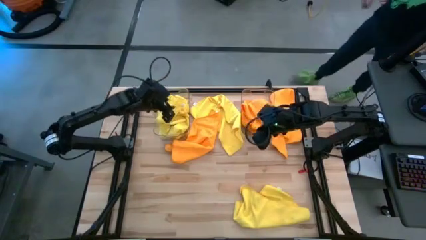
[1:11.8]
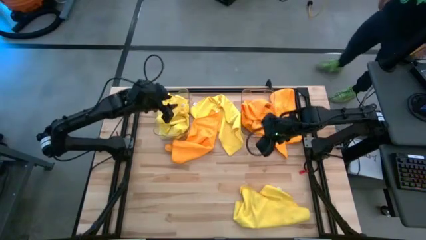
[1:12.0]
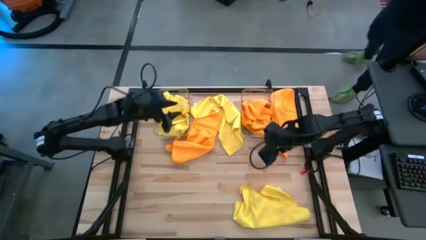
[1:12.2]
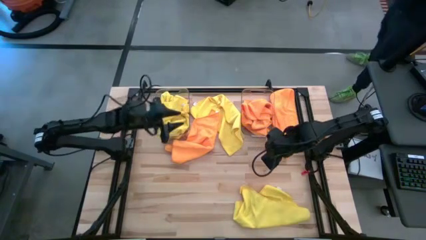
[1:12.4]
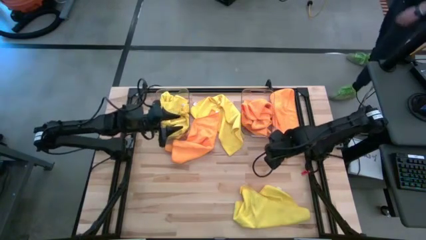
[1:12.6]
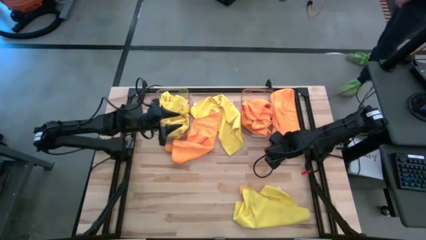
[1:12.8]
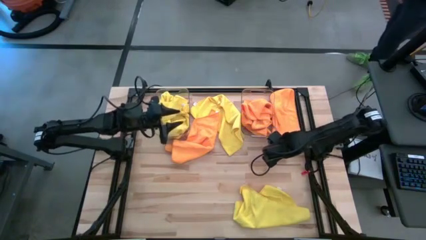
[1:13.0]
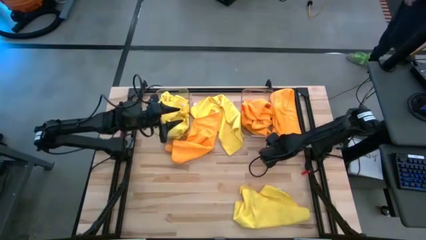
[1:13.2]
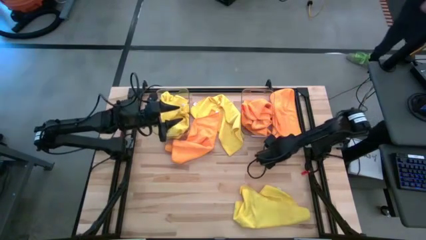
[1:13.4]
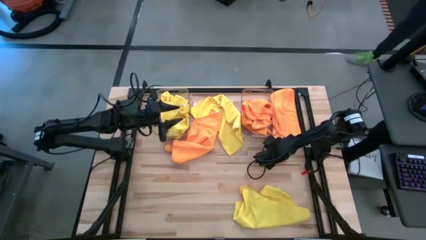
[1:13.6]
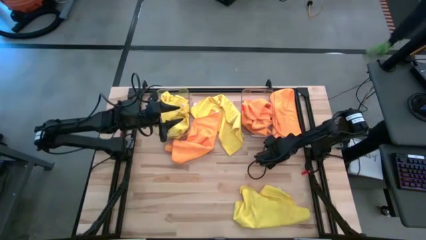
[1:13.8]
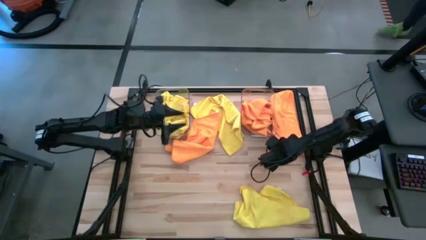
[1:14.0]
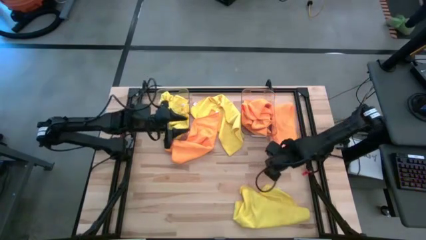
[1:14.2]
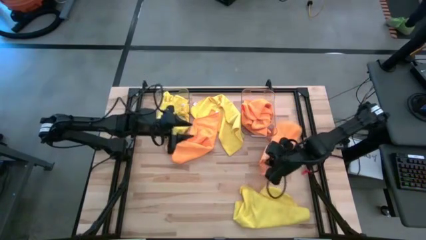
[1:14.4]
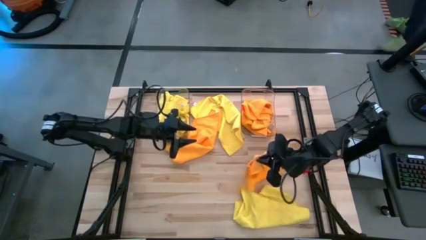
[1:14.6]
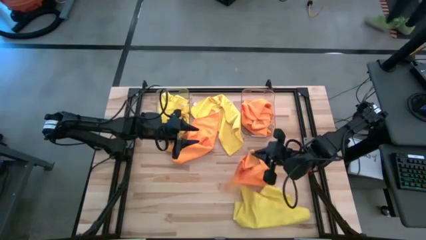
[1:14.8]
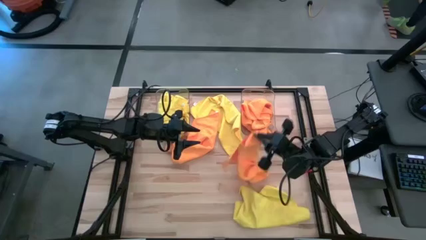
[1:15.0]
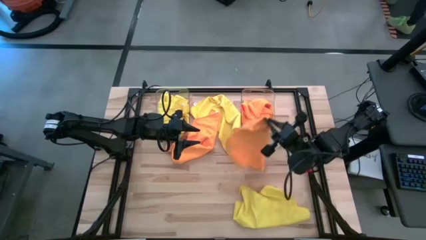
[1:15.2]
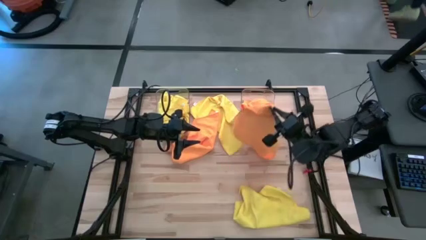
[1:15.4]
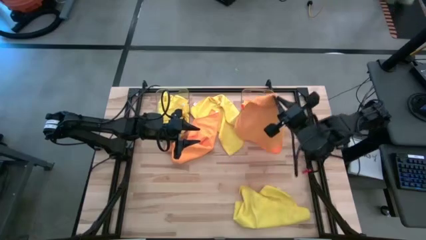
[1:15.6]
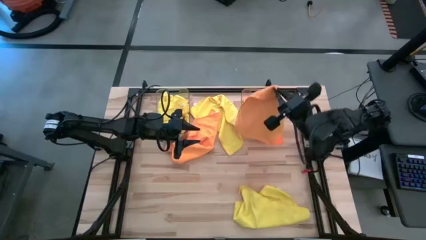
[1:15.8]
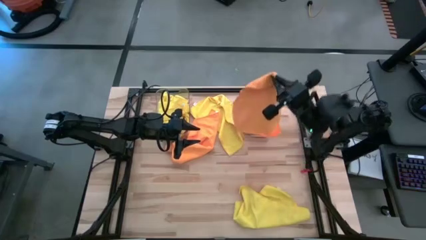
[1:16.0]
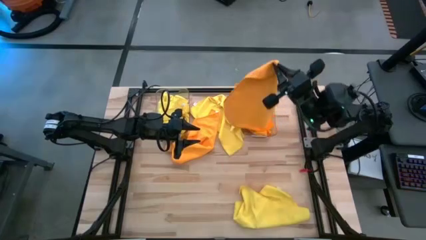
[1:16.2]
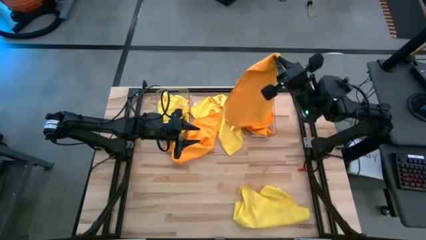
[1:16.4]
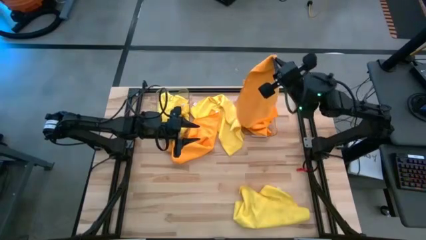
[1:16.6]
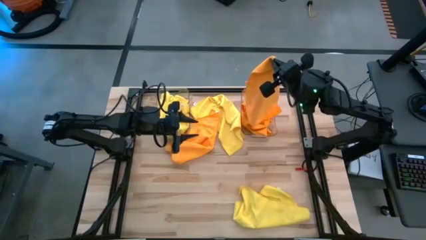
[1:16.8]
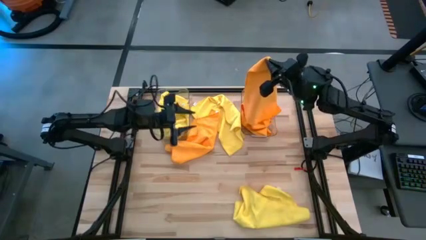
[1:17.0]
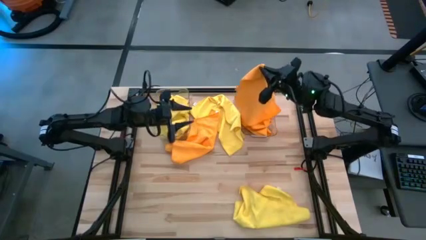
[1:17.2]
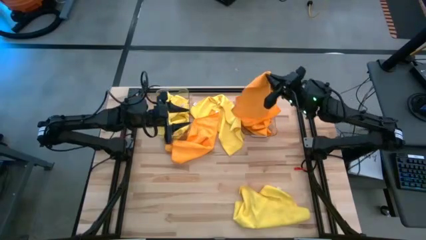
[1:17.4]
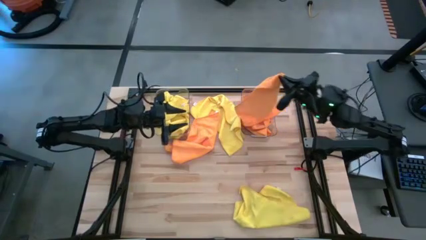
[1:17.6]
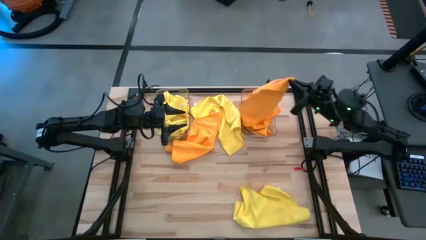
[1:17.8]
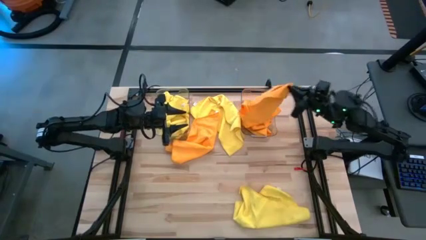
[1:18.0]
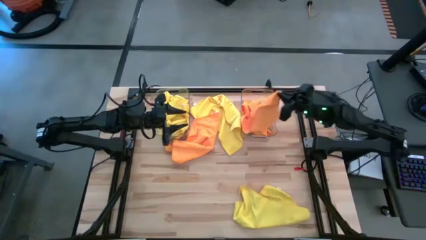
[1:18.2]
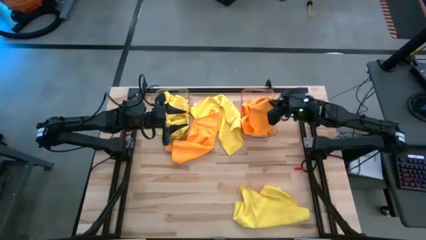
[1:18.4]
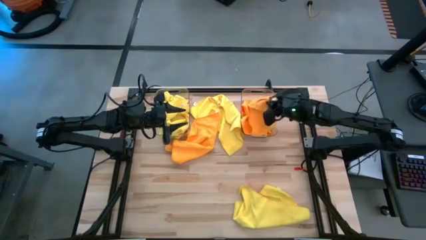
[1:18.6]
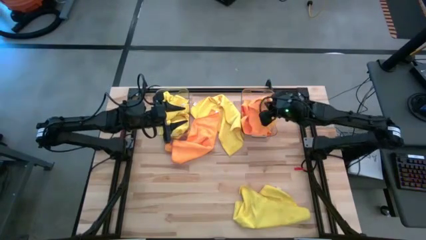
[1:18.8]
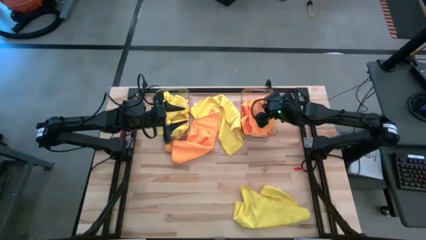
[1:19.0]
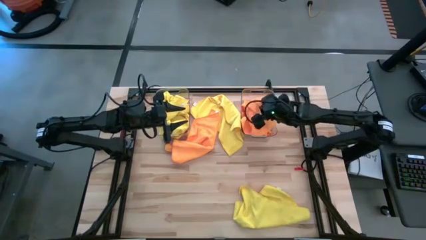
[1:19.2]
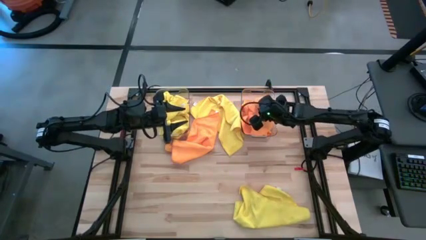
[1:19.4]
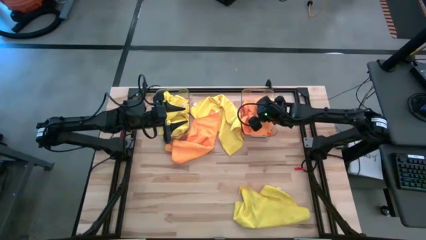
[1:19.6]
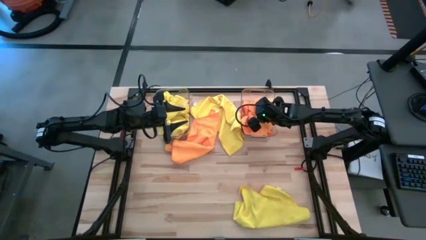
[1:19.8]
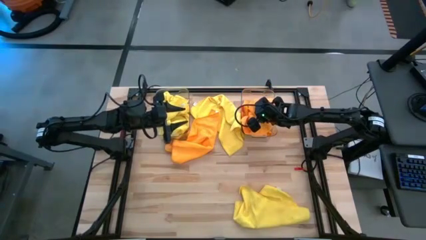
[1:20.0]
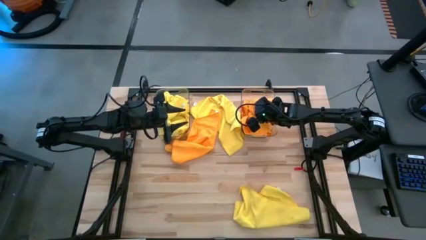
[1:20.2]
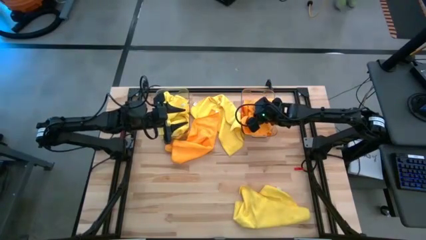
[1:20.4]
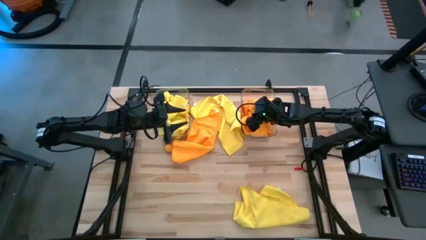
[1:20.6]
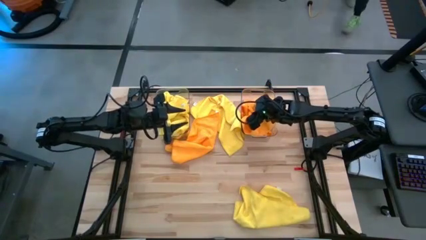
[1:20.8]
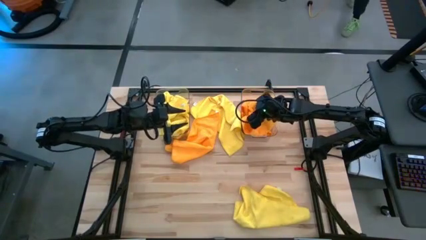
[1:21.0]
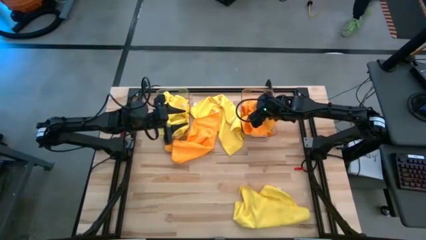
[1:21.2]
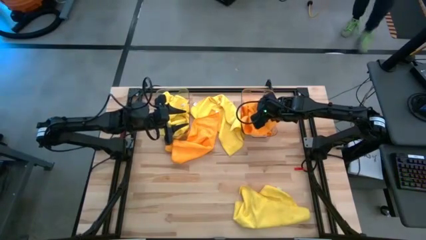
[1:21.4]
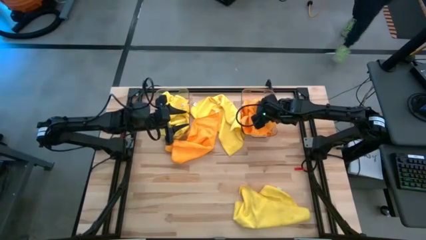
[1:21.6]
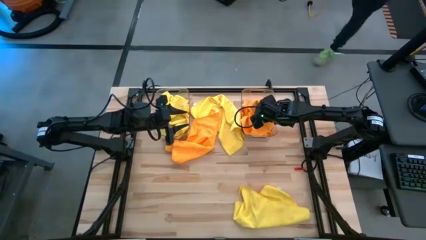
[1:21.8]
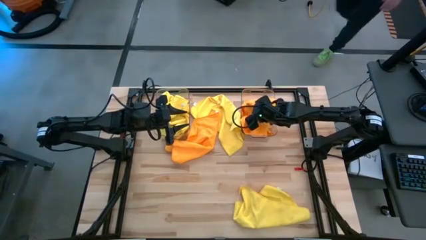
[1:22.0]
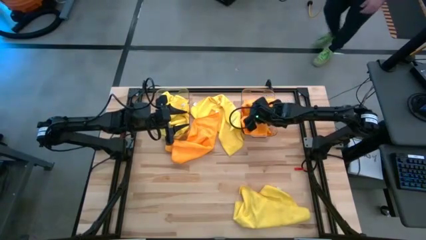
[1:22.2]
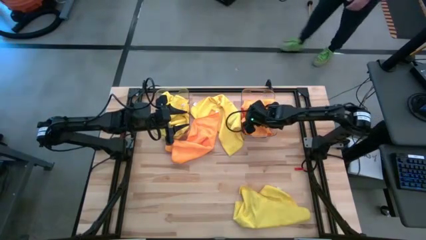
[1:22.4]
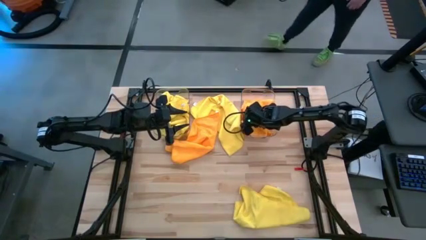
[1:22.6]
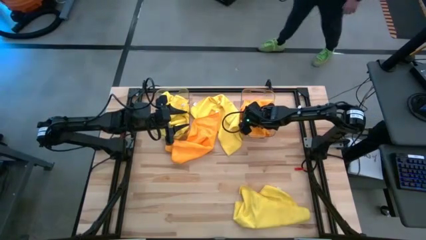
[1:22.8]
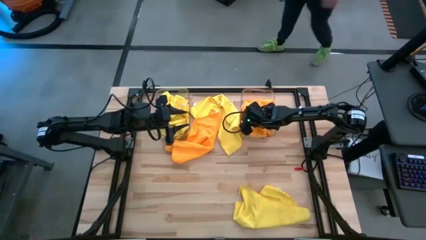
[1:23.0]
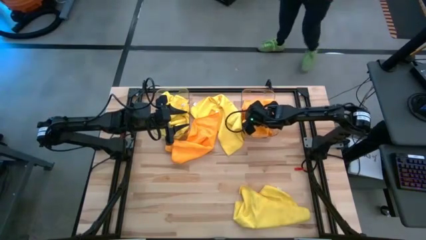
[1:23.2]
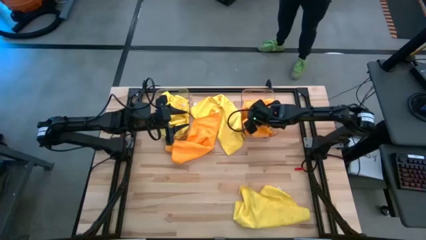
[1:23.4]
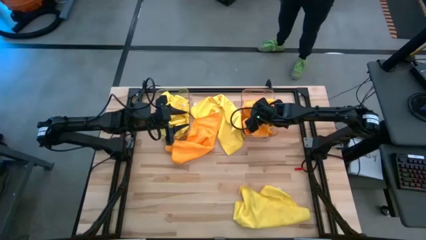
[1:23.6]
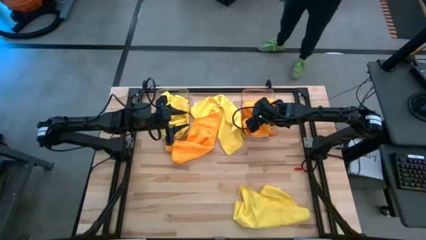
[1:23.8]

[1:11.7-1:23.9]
Task: Sort microfiber towel by color & place in baskets
Put the orange microfiber cloth into the right transparent bin

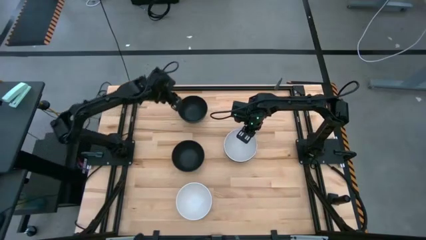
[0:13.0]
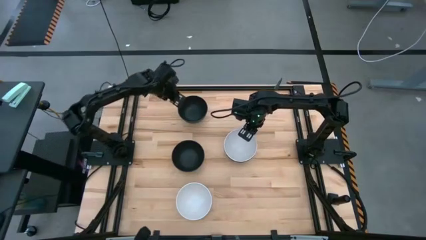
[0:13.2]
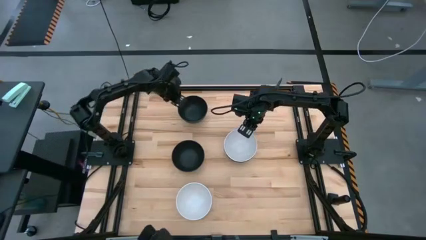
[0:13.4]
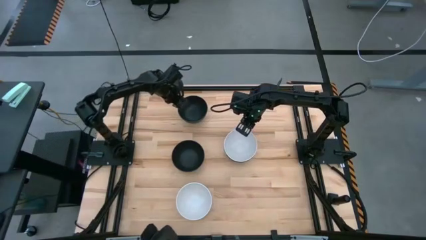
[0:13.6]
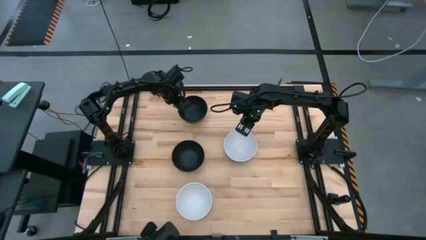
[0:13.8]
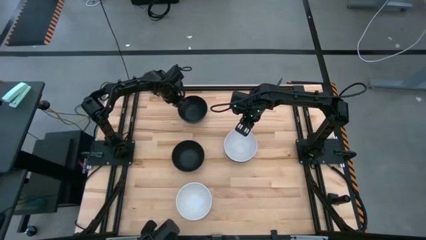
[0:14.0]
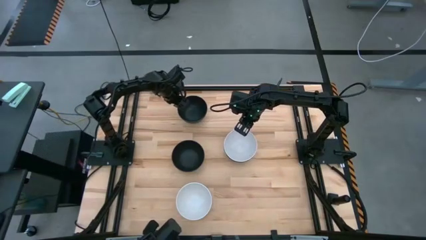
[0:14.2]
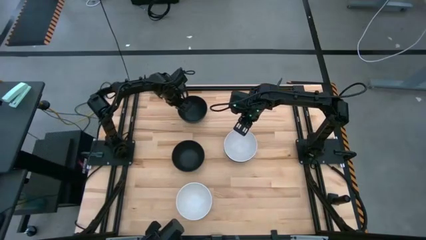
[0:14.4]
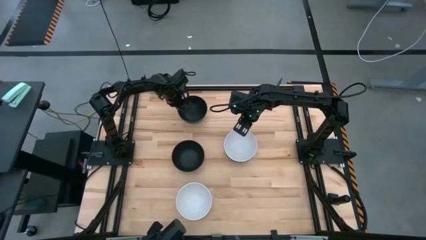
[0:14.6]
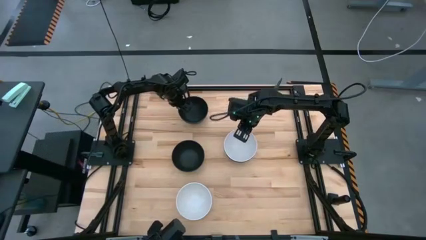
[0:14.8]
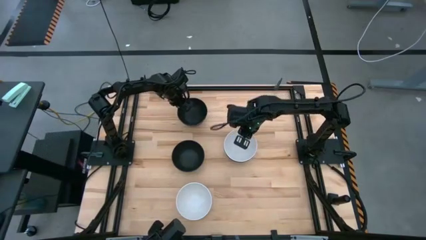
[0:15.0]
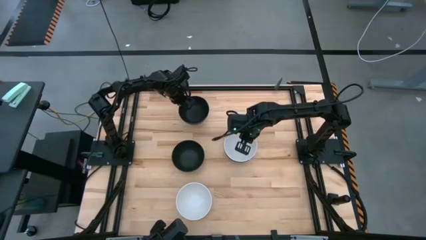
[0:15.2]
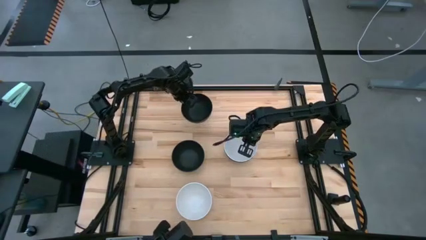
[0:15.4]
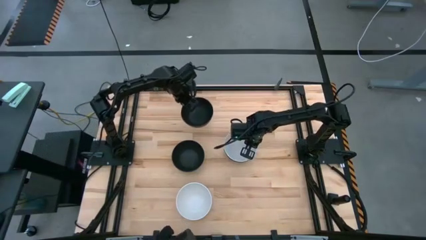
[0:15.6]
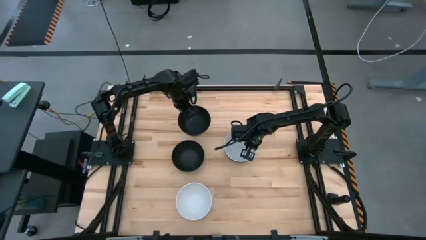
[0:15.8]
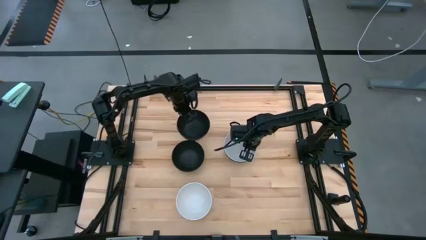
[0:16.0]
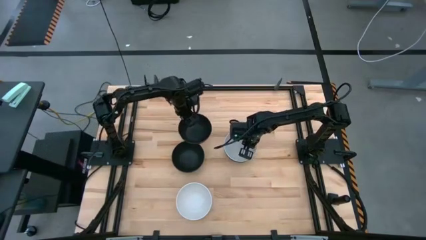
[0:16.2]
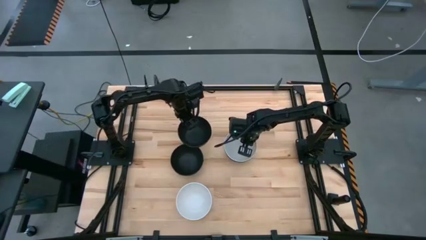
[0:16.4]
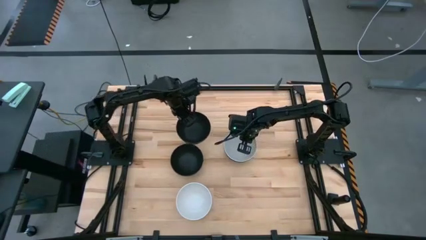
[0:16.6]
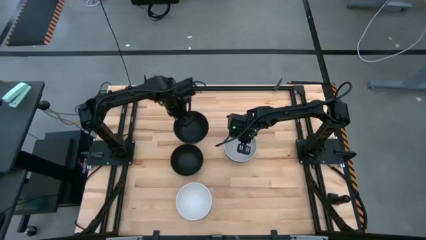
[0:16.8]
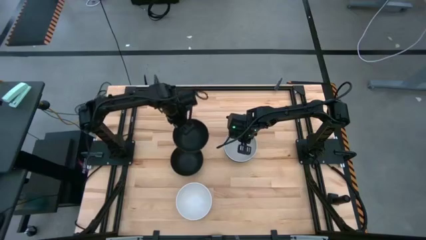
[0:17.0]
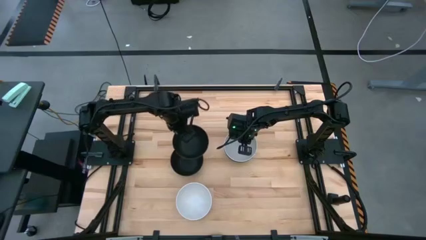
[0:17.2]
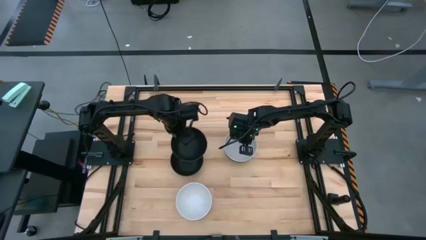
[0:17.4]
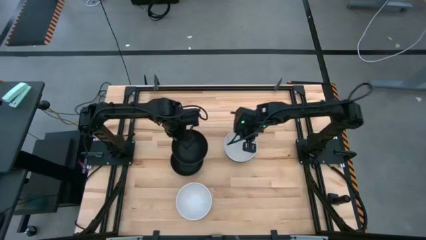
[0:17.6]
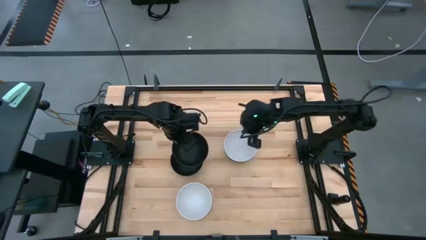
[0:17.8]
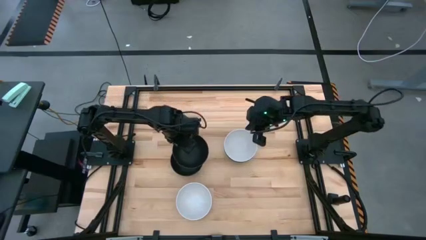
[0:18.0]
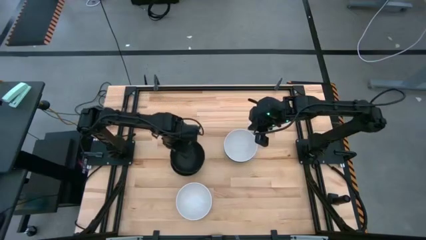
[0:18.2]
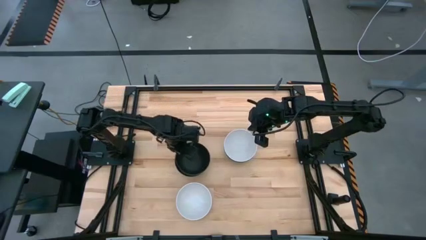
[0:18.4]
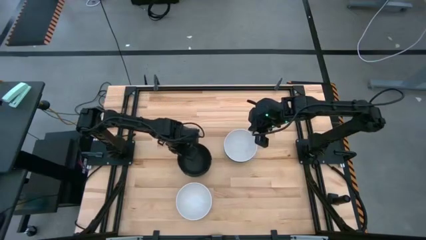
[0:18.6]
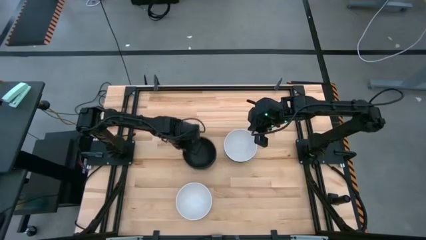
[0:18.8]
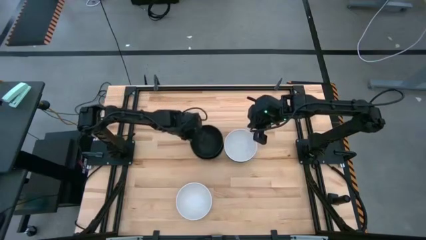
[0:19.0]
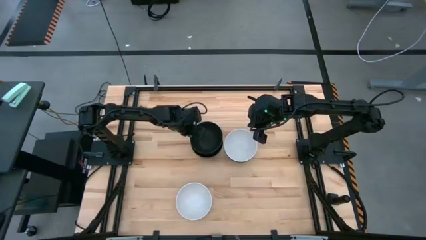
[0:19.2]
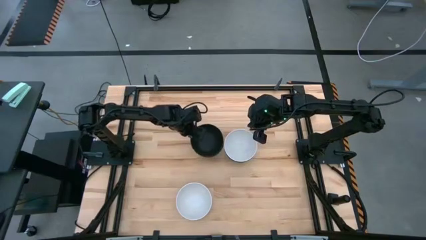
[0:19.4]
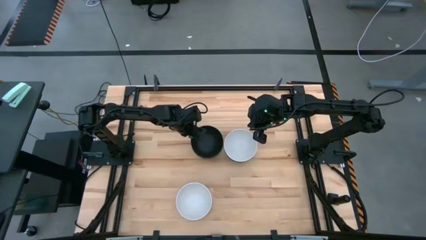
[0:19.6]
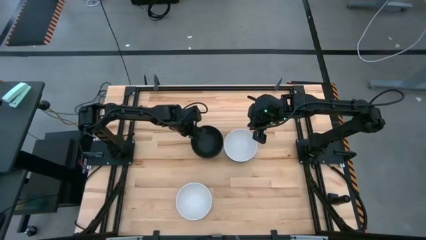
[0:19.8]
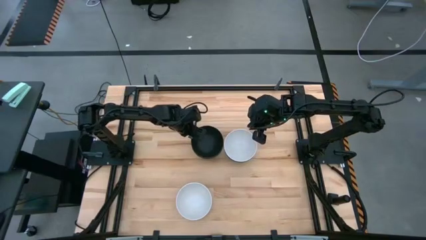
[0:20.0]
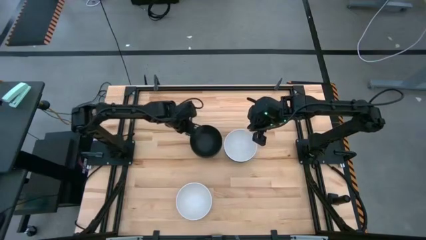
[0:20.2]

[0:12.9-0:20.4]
Task: Nest bowls inside each other
Stack the top black bowl on top of the bottom black bowl
